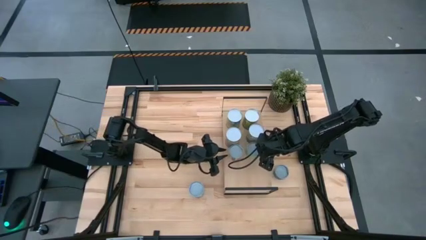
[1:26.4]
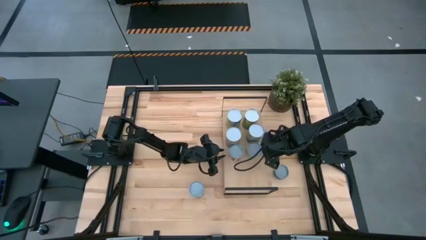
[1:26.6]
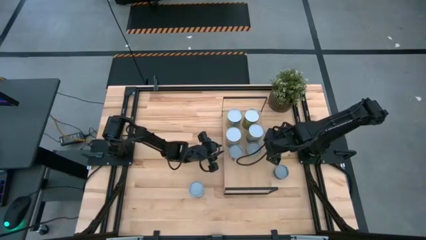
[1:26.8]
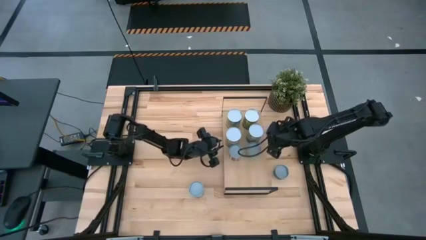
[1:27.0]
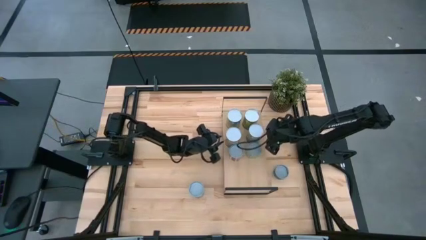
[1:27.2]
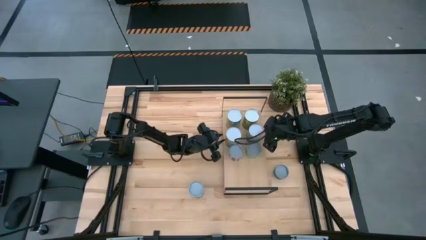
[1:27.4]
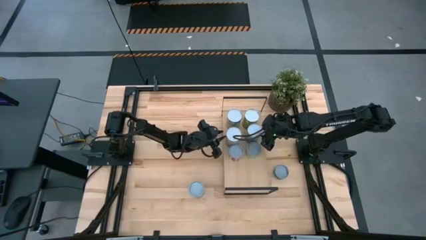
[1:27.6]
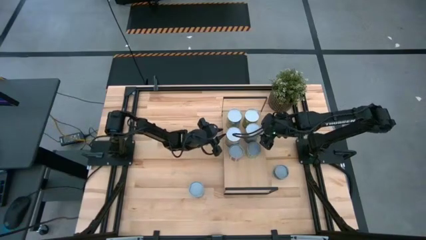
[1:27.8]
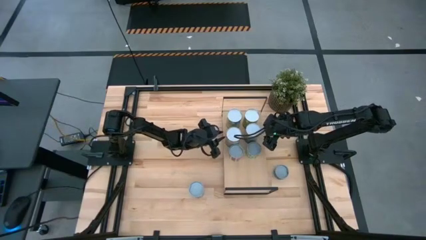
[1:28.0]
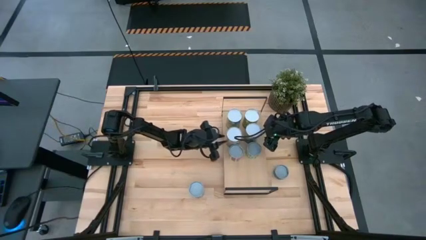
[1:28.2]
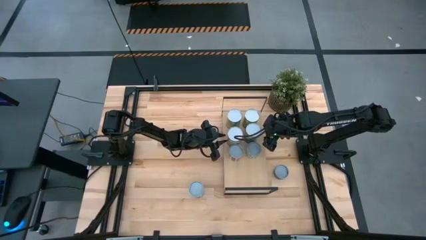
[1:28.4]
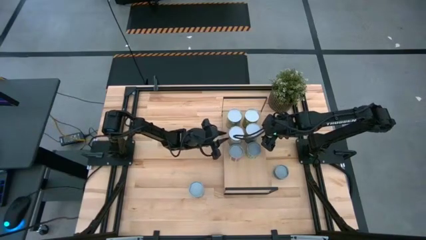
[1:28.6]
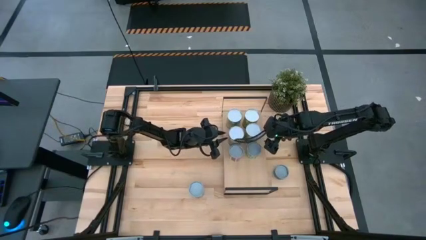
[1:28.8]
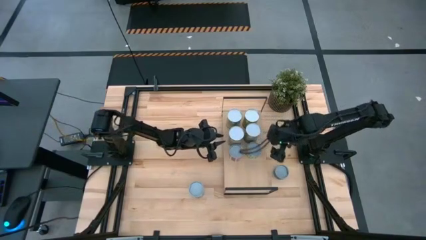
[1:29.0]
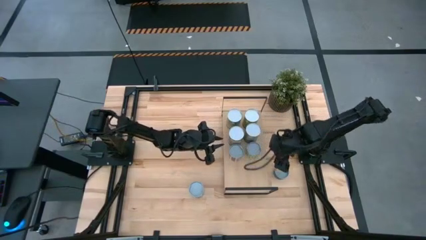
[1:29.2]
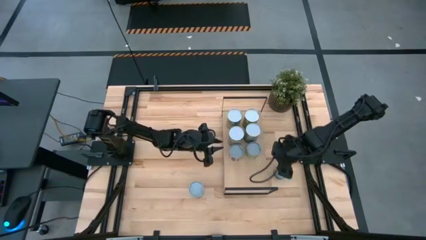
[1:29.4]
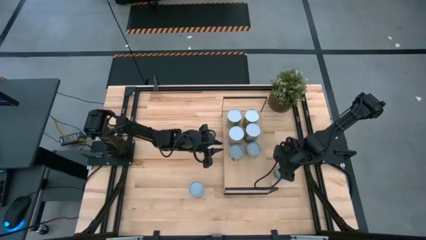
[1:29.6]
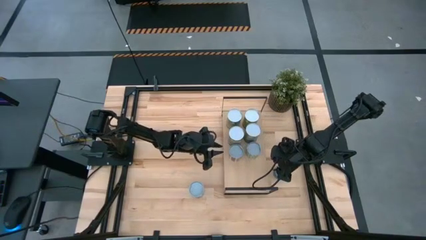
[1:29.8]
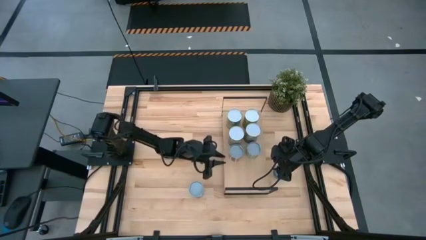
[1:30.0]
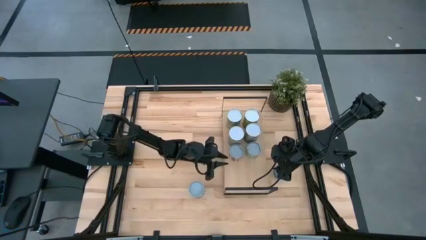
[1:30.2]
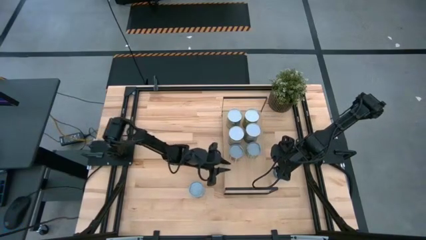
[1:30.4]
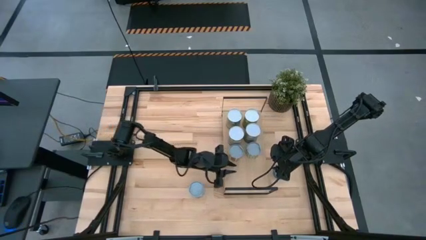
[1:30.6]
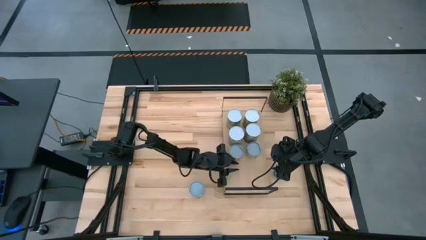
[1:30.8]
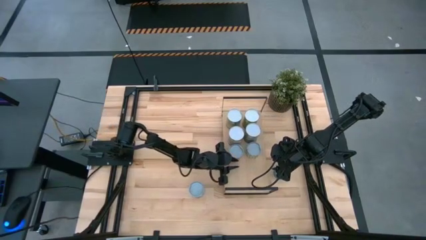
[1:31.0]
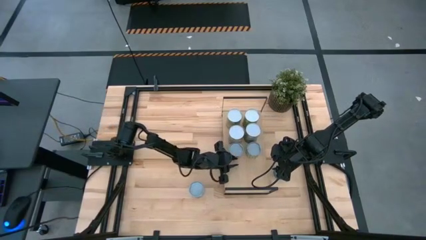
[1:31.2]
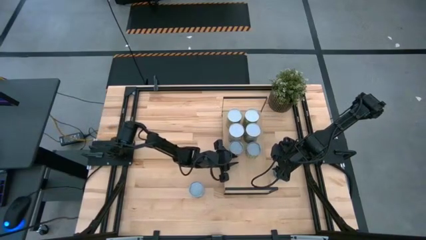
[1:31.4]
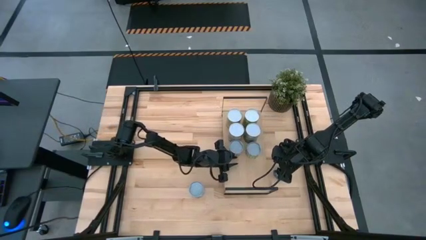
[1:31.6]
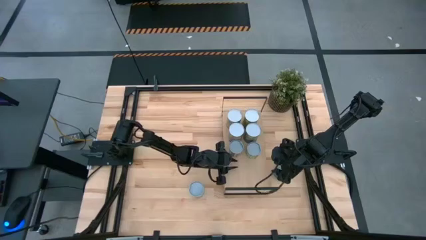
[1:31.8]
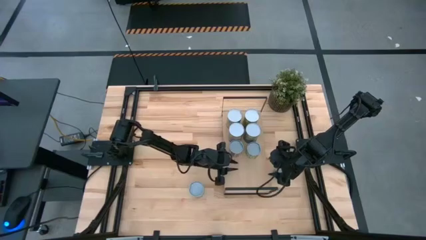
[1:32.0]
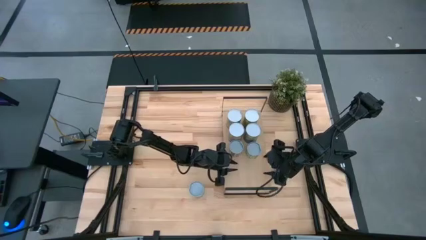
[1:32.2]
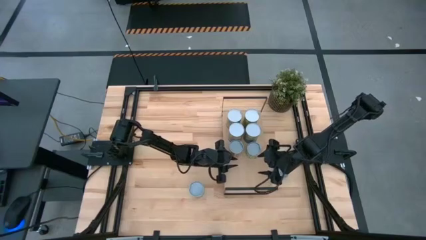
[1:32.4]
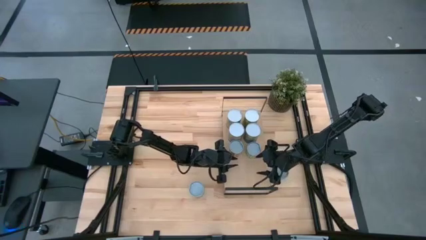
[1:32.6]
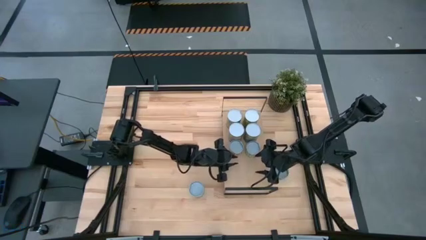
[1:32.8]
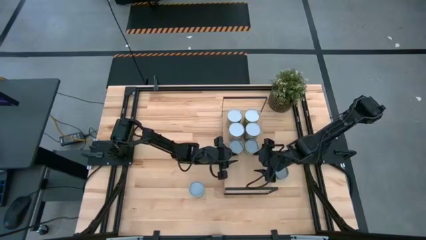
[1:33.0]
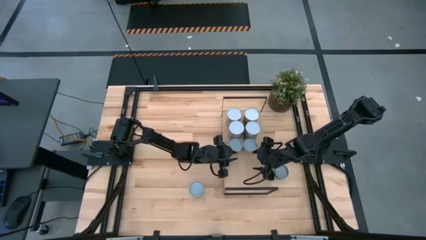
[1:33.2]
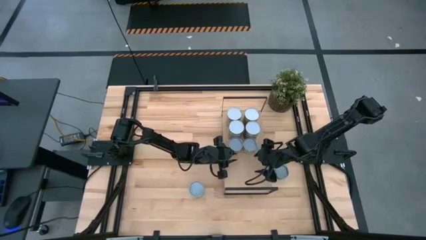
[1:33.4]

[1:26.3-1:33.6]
Task: Pick and place cans onto a shelf
Adjust the cans on the shelf

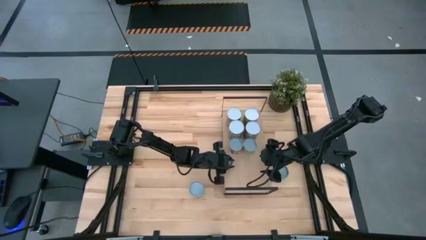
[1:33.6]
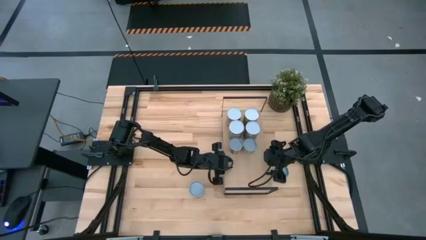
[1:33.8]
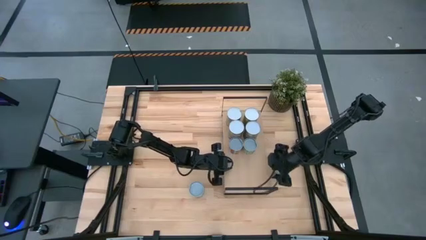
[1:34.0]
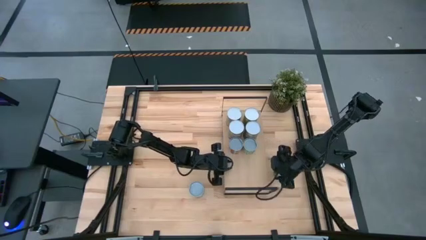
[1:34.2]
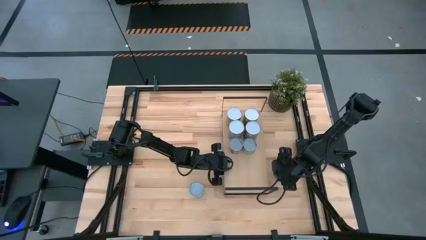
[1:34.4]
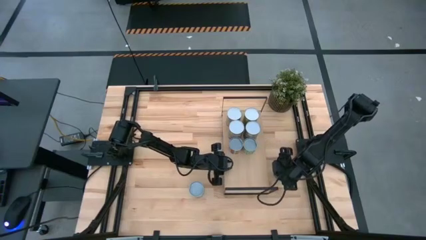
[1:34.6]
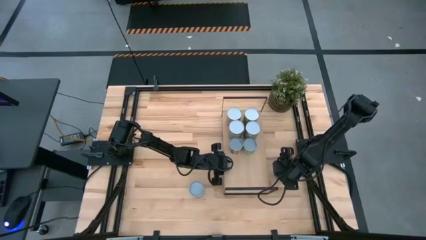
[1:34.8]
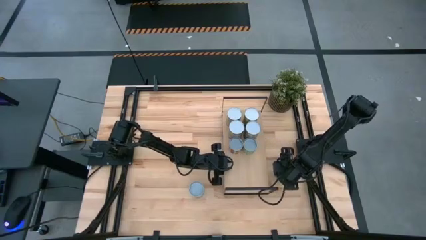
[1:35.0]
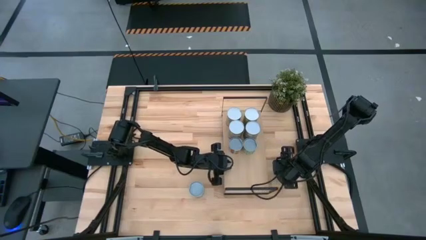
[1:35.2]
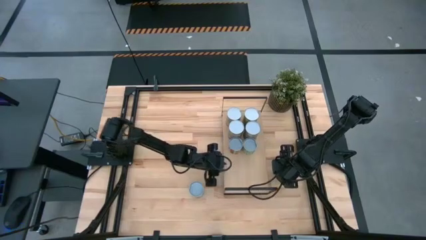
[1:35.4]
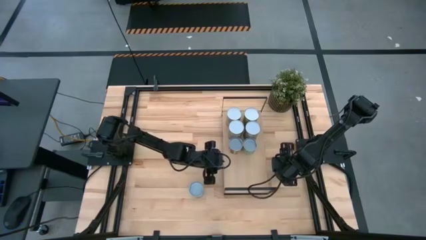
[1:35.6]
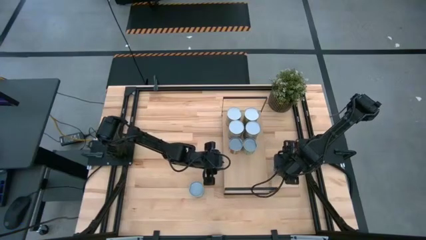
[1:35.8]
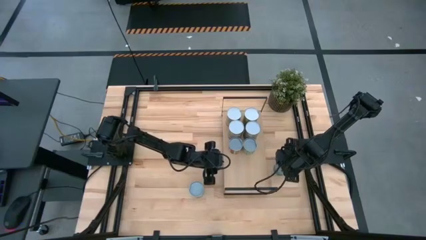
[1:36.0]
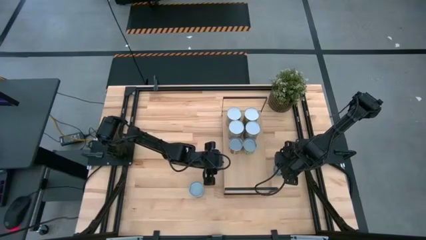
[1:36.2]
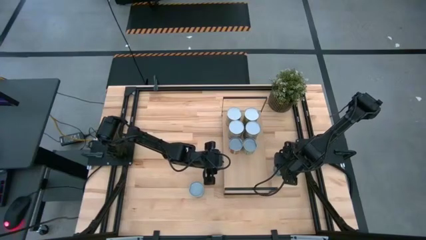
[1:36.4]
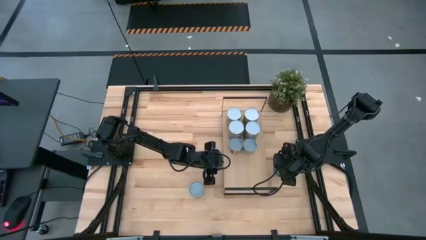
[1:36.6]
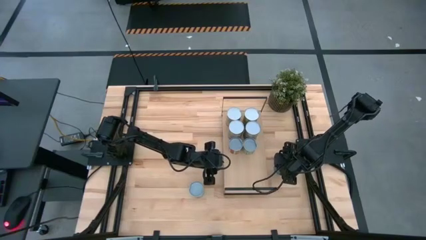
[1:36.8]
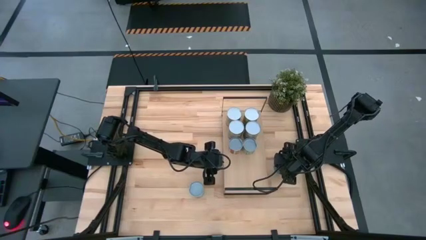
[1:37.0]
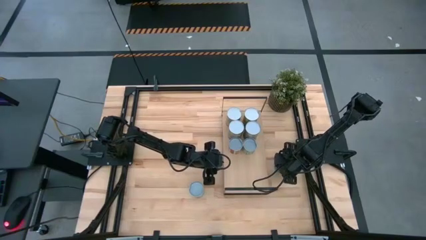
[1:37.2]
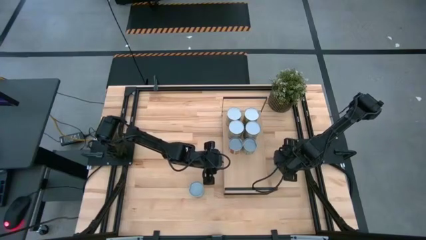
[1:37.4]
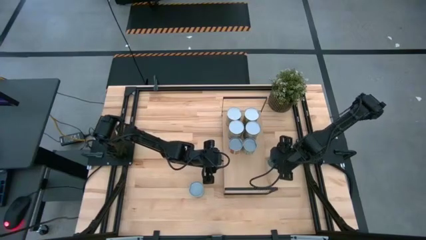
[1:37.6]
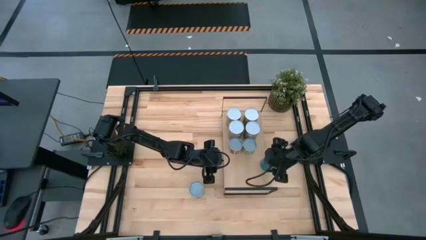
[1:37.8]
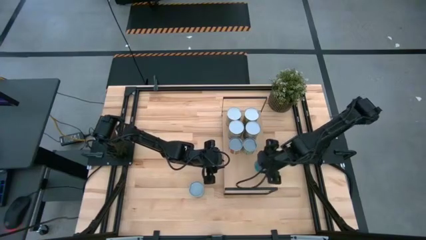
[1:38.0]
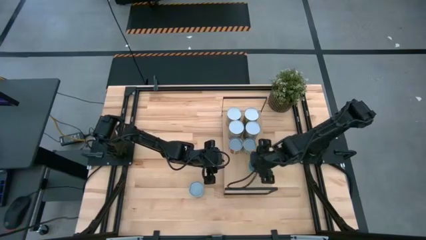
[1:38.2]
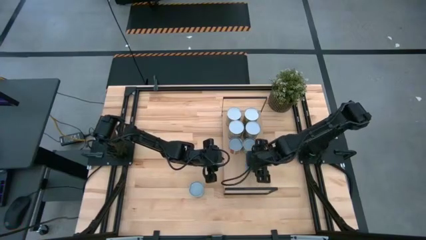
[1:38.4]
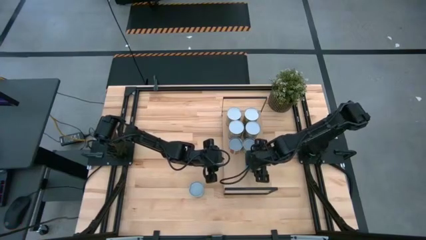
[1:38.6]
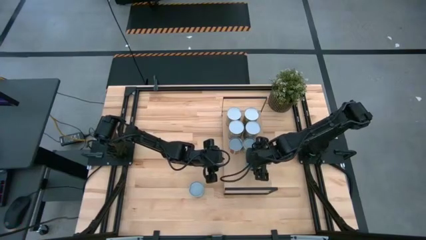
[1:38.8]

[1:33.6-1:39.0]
Put the canned tuna on the shelf

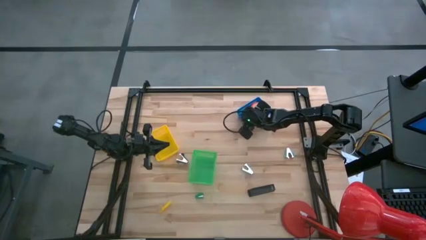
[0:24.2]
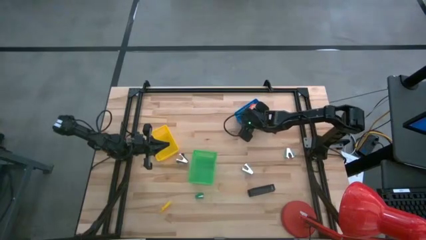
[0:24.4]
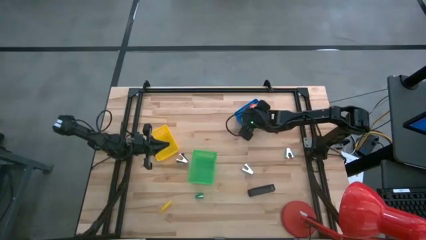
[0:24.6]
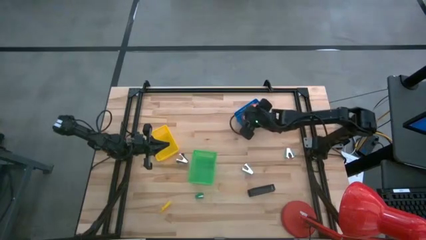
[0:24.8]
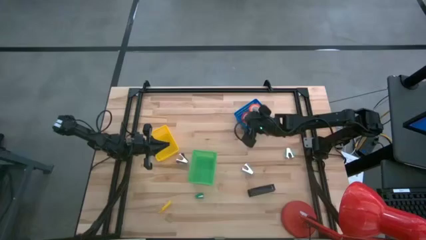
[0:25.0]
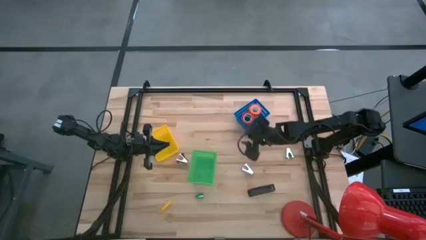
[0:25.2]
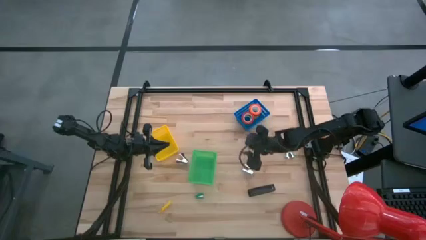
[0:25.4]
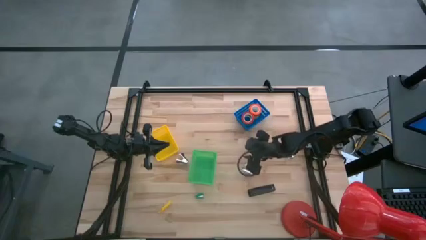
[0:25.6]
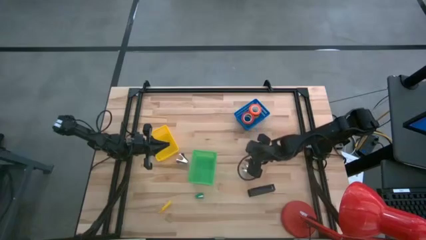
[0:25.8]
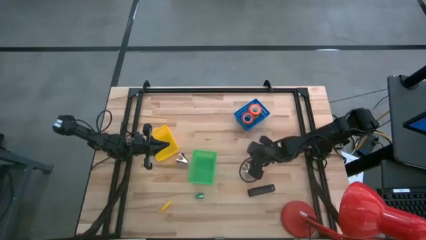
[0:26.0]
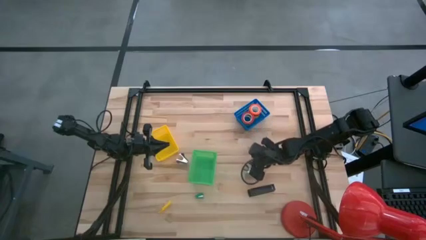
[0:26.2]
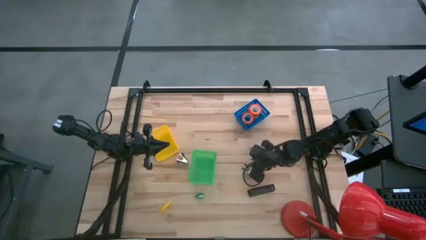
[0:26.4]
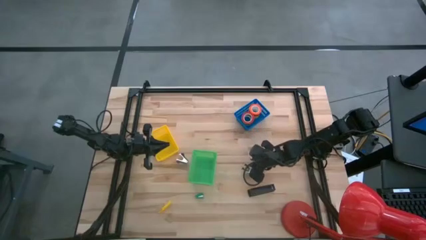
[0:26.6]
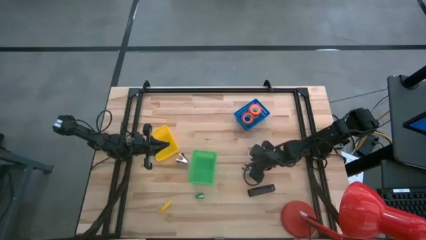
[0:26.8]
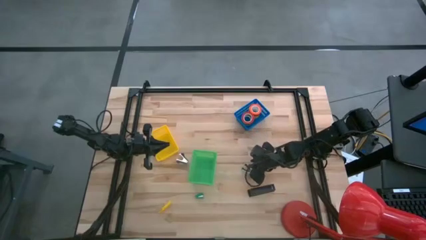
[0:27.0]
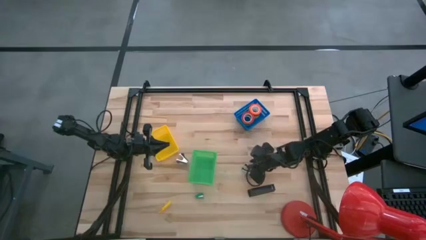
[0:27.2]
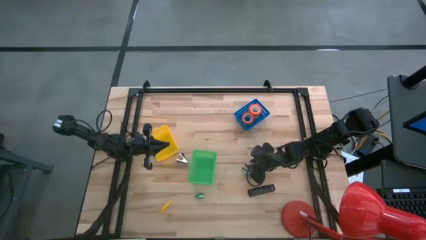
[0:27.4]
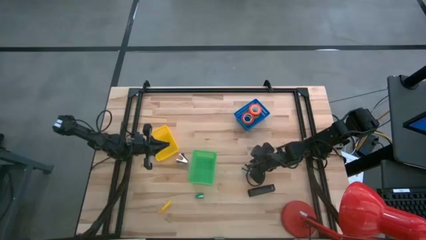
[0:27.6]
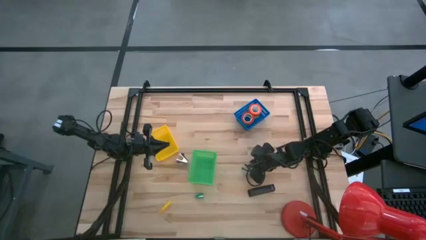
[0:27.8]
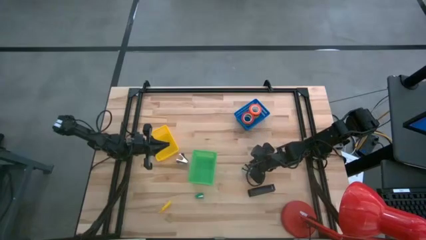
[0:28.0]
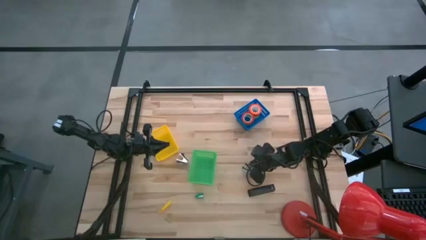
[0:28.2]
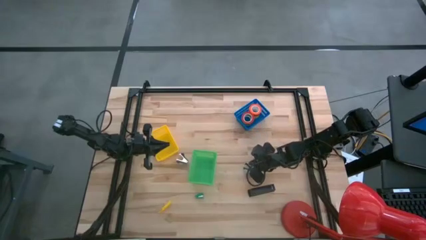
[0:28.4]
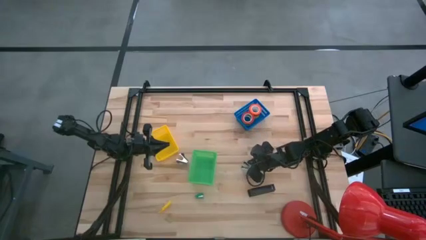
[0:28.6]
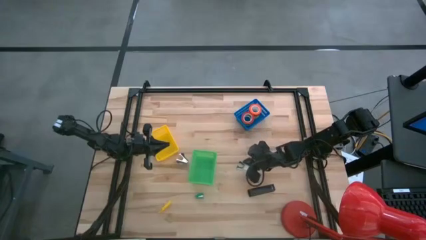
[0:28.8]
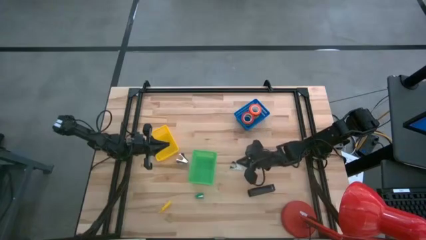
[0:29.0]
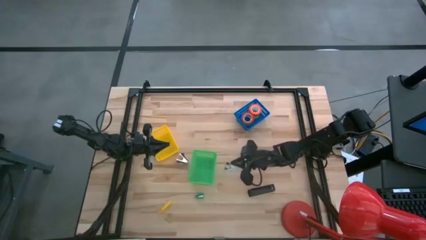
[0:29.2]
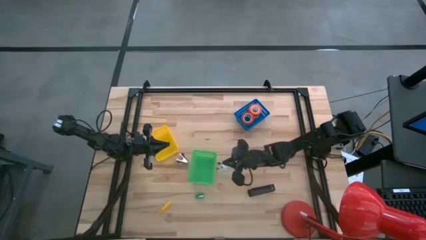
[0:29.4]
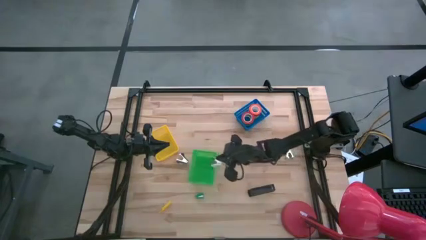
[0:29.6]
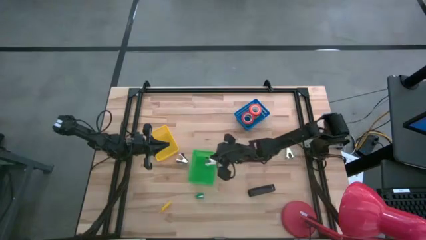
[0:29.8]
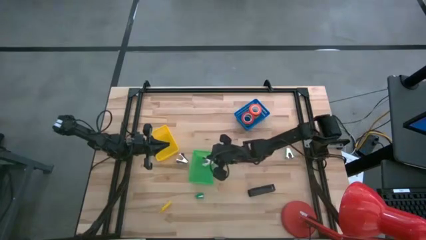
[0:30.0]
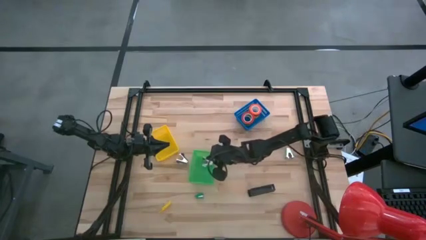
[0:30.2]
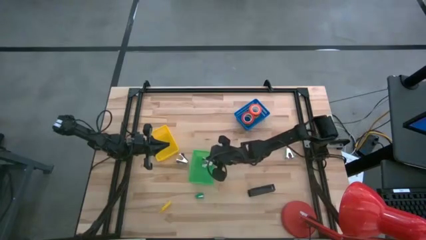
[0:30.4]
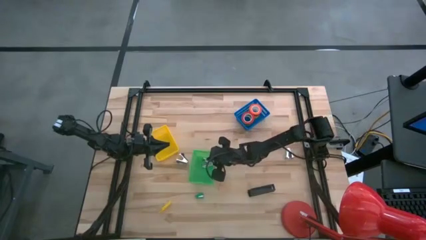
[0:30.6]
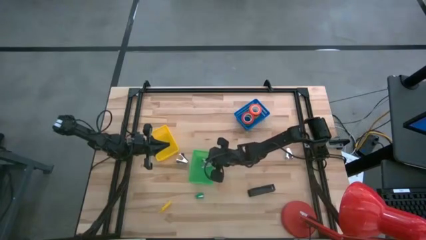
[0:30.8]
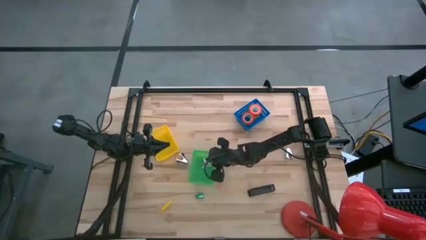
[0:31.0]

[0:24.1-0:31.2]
Task: Pick and place Stapler, Stapler remover, tape
Put the left light blue staple remover into the green bin
